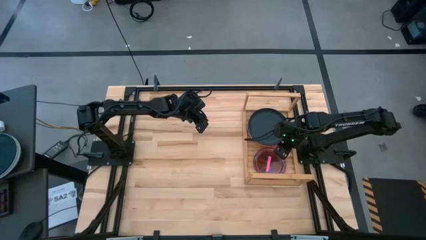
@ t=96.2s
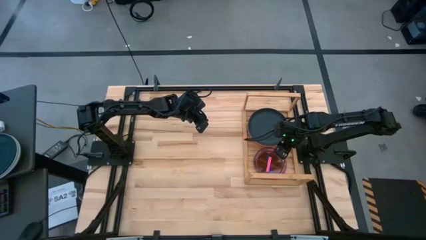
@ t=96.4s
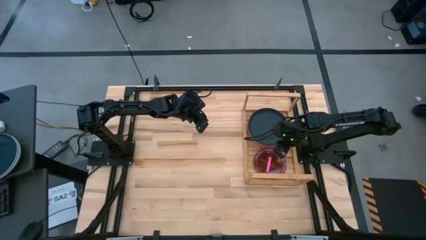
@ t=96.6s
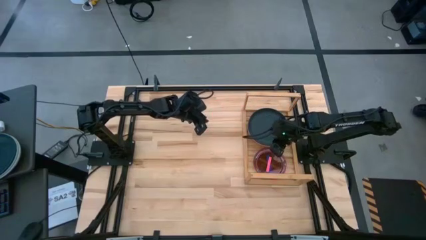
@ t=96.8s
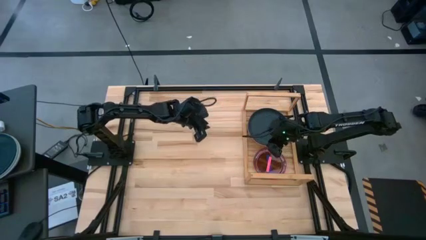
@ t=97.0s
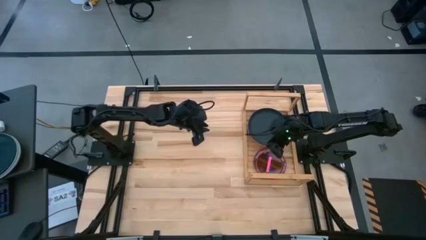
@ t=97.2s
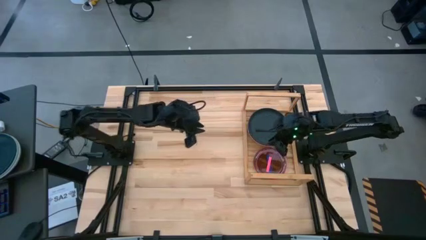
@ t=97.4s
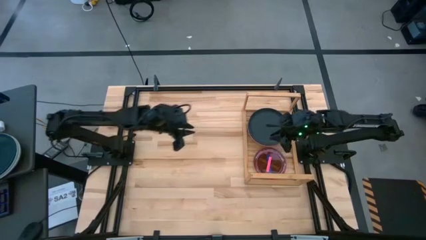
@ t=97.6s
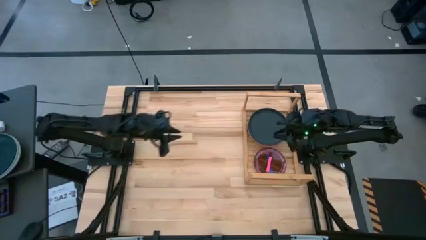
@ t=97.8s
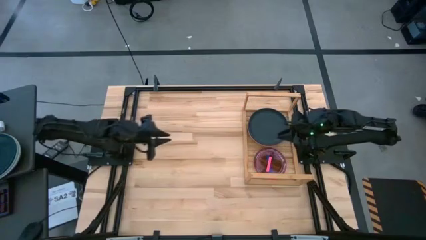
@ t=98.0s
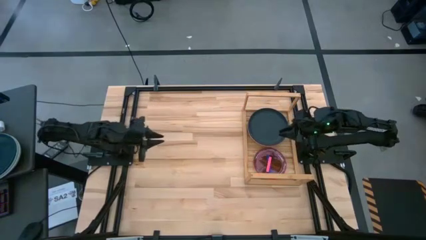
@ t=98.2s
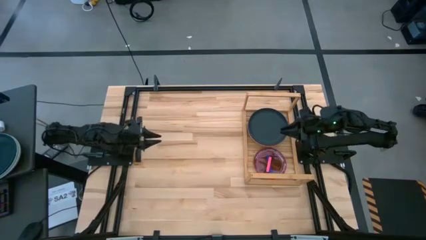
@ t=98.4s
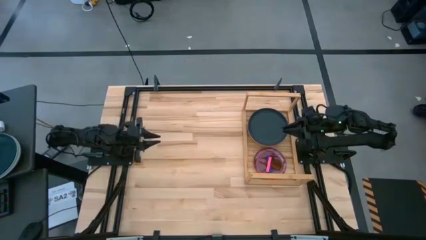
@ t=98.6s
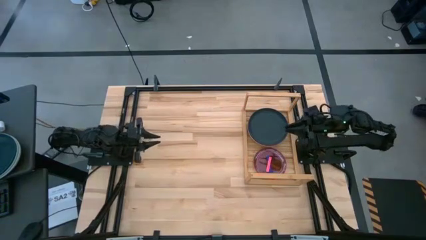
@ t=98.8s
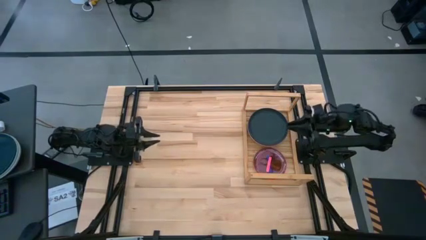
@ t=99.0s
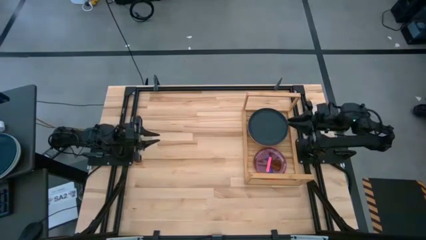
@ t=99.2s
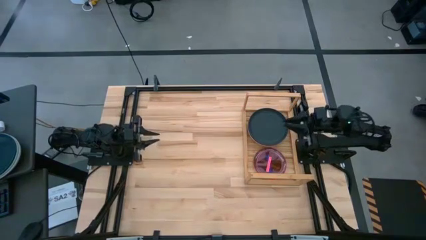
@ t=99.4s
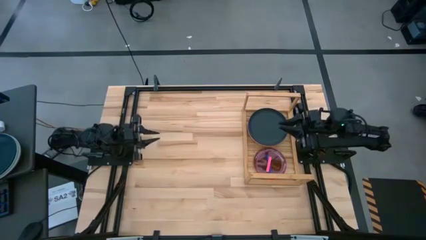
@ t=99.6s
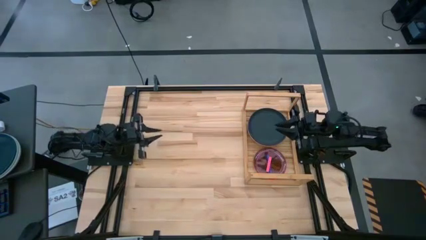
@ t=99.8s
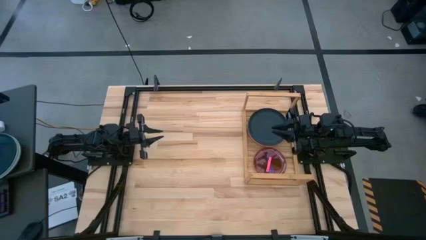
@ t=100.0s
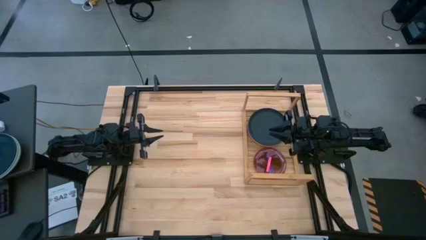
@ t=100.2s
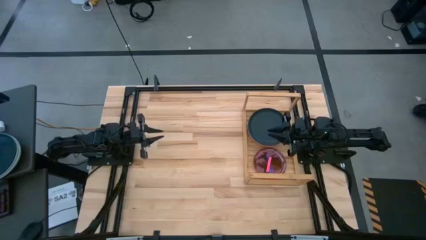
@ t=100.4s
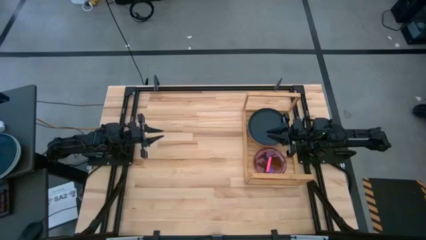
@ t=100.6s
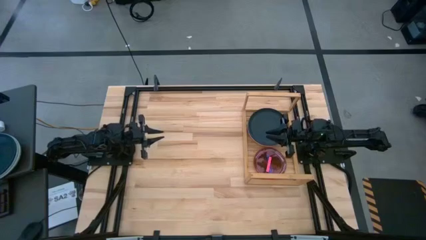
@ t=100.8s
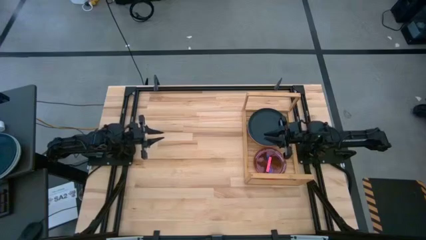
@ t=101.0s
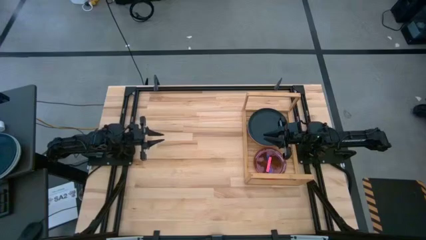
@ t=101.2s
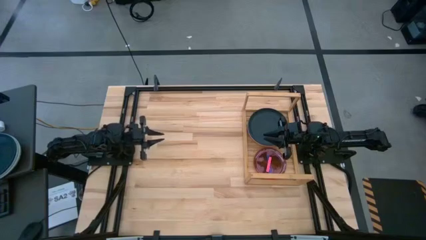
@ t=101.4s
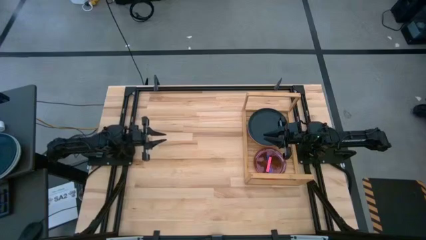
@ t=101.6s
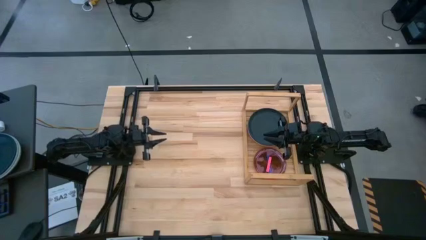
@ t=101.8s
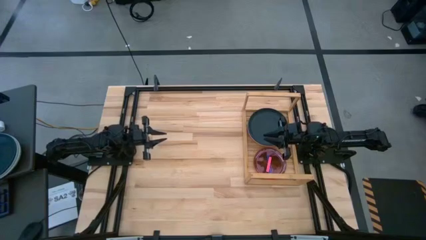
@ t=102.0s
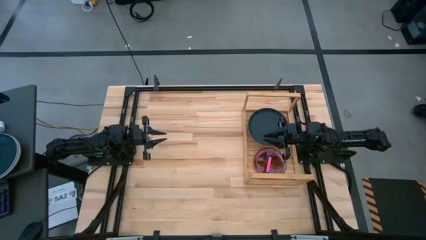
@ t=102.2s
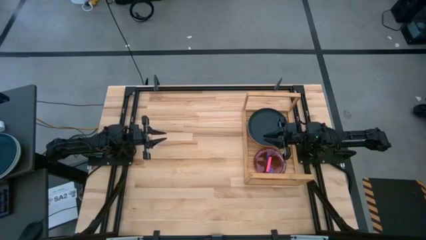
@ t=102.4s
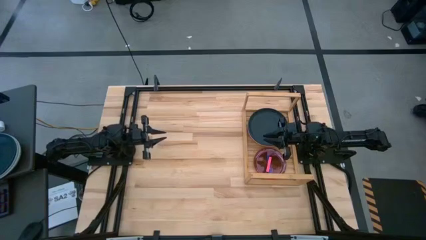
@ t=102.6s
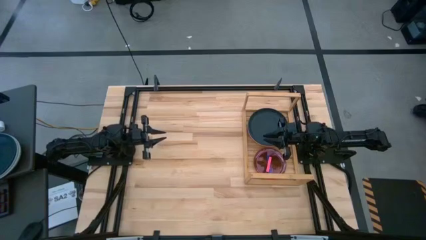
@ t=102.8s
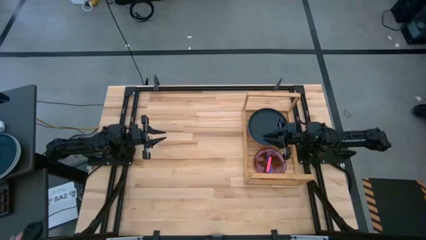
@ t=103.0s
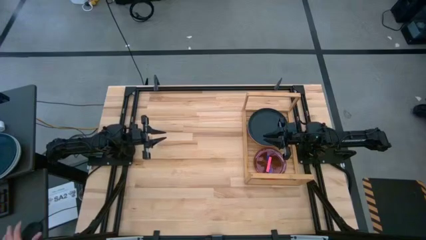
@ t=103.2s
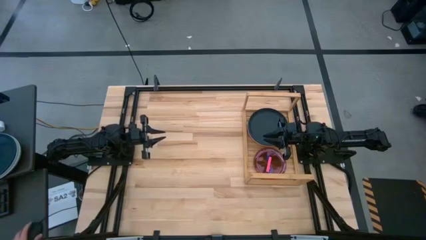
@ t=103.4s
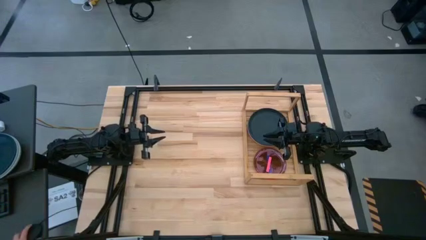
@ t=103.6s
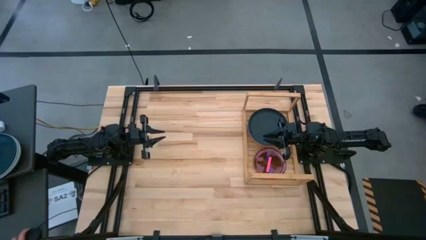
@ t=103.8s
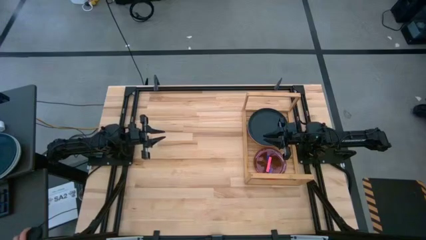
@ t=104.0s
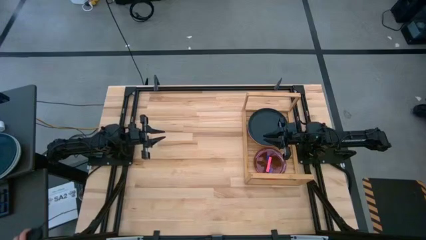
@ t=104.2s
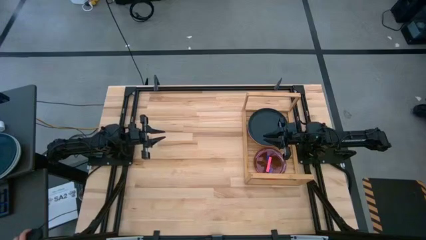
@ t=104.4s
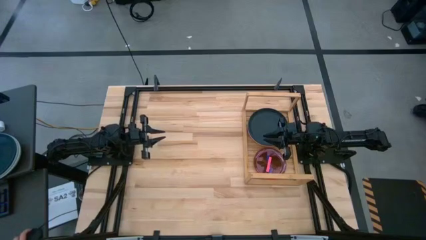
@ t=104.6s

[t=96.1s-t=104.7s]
Task: Place and stack plates onto a shelf
Return to Home Position

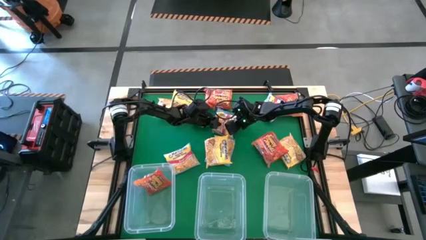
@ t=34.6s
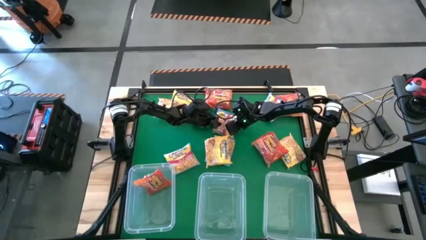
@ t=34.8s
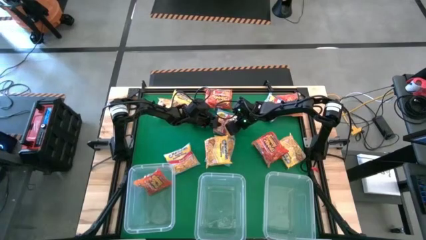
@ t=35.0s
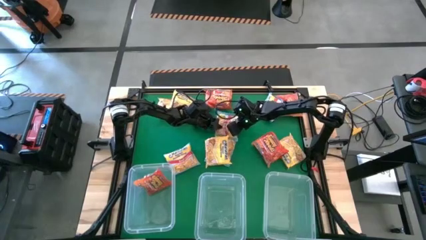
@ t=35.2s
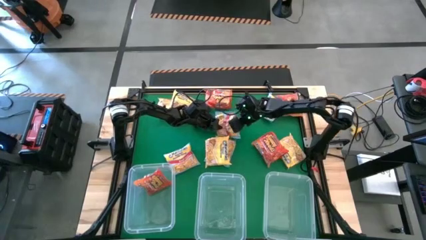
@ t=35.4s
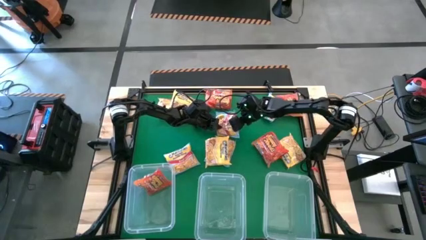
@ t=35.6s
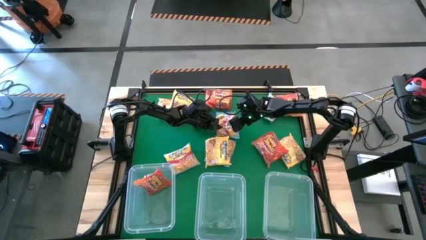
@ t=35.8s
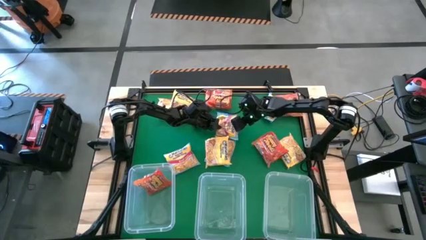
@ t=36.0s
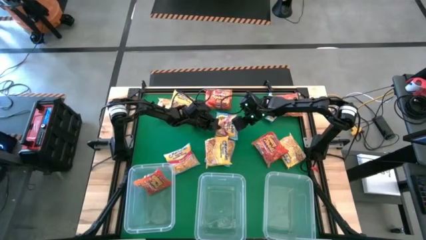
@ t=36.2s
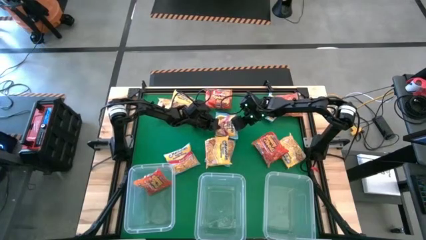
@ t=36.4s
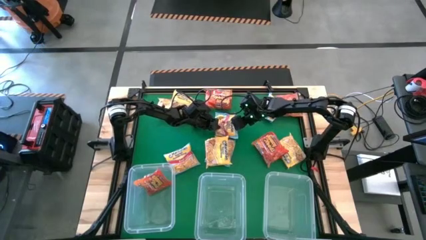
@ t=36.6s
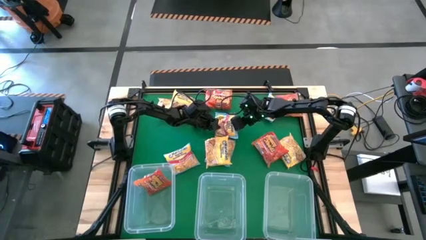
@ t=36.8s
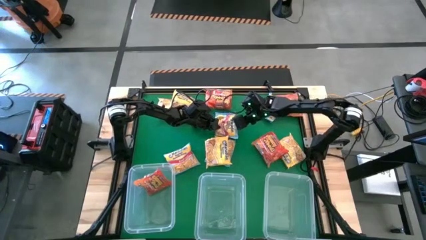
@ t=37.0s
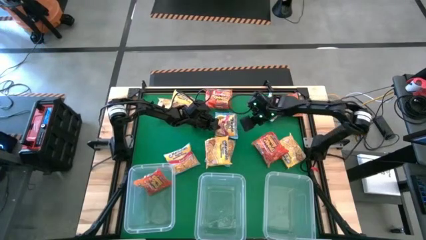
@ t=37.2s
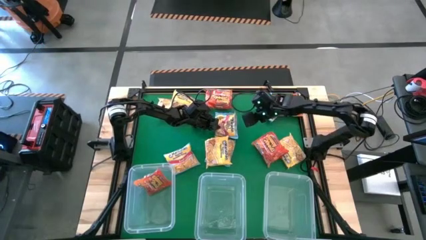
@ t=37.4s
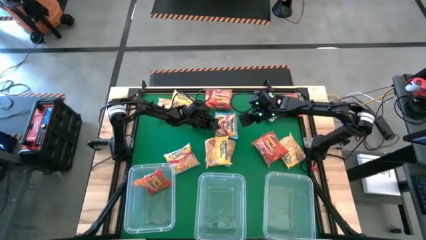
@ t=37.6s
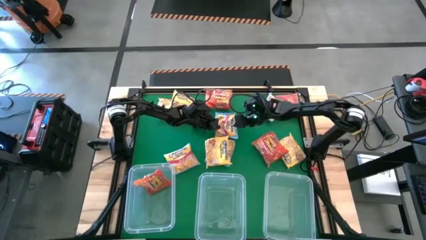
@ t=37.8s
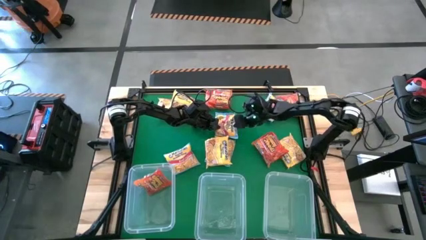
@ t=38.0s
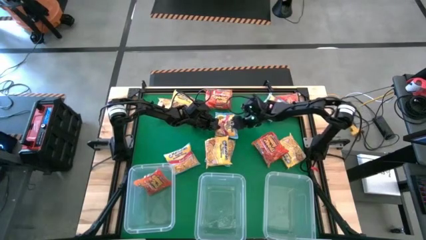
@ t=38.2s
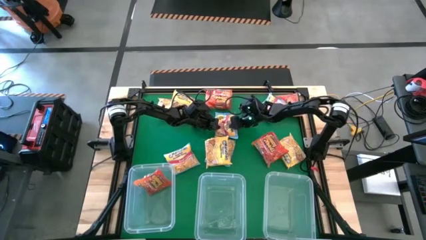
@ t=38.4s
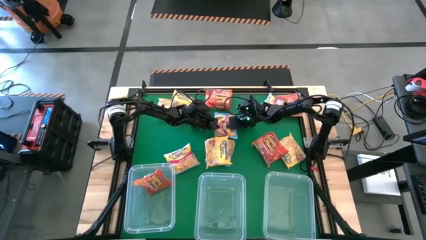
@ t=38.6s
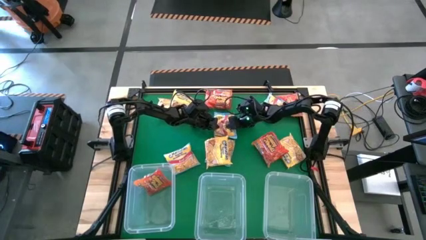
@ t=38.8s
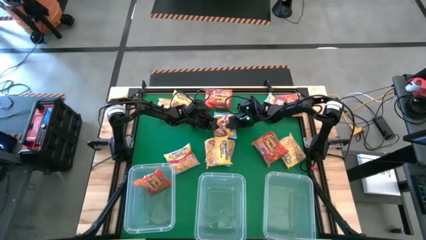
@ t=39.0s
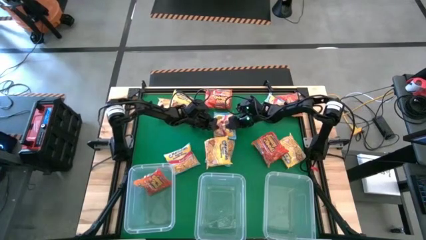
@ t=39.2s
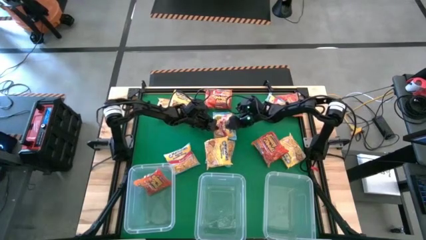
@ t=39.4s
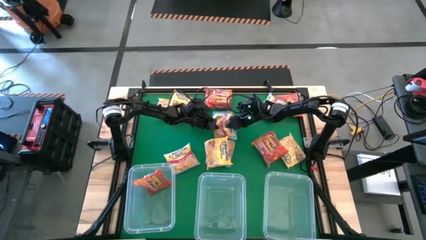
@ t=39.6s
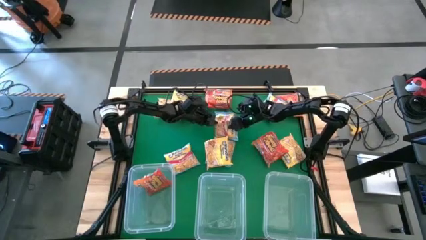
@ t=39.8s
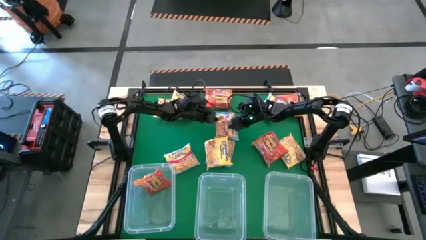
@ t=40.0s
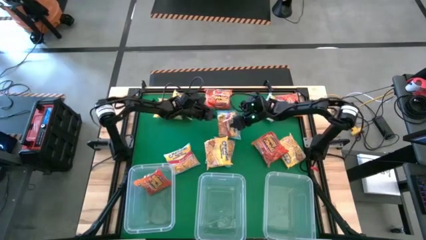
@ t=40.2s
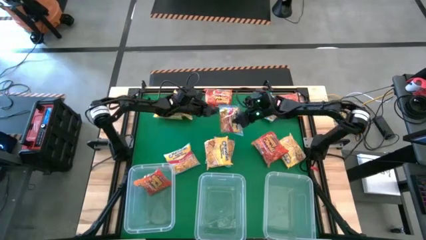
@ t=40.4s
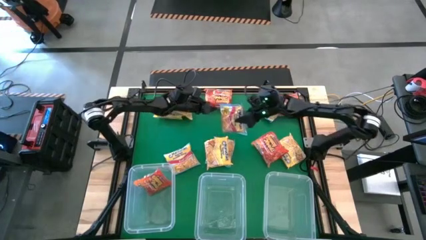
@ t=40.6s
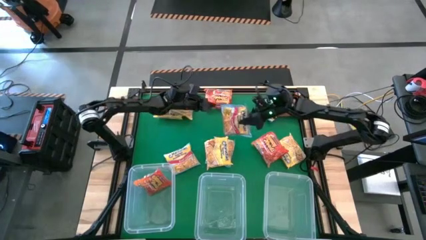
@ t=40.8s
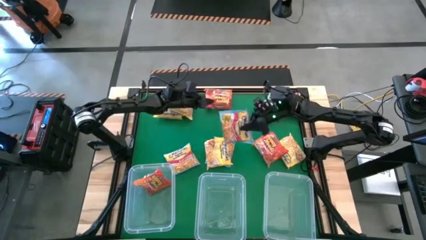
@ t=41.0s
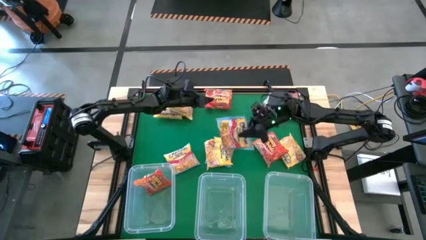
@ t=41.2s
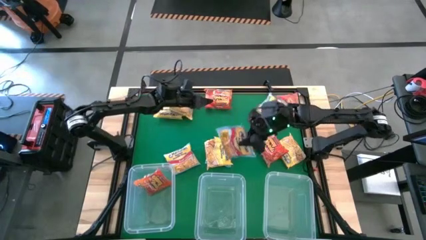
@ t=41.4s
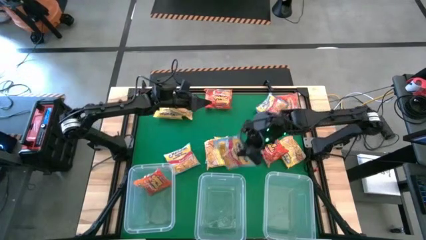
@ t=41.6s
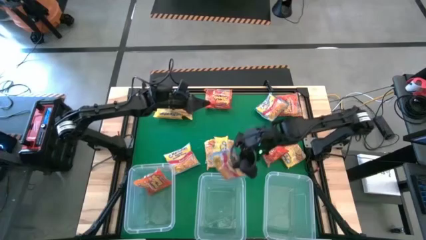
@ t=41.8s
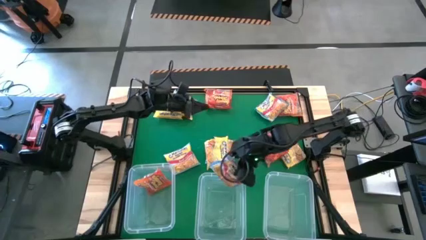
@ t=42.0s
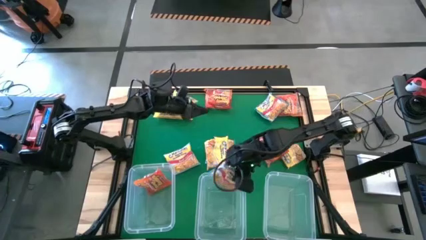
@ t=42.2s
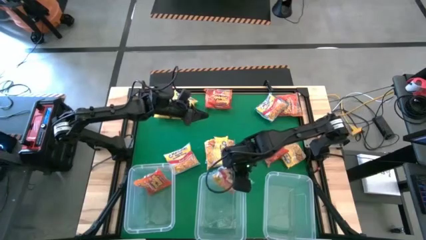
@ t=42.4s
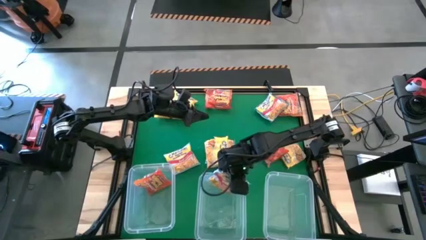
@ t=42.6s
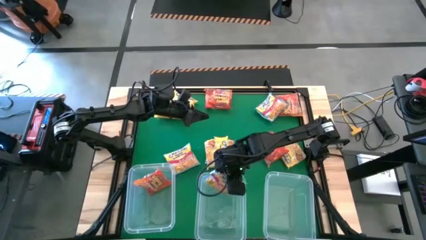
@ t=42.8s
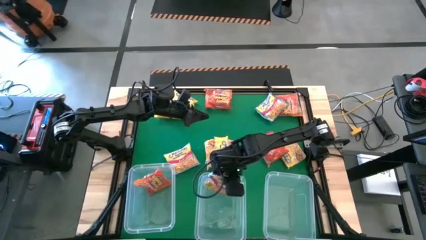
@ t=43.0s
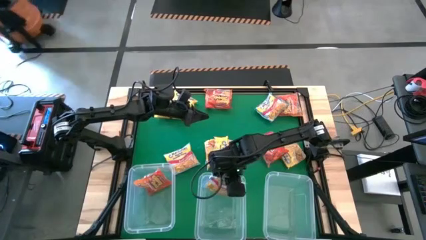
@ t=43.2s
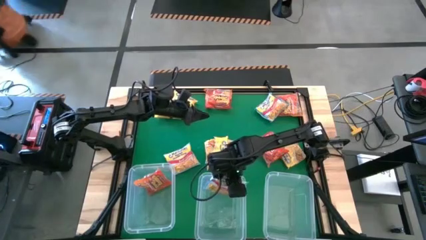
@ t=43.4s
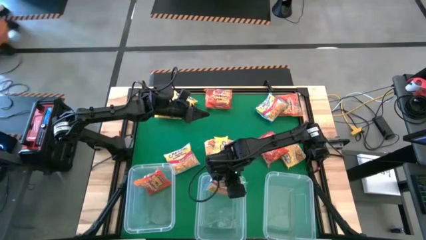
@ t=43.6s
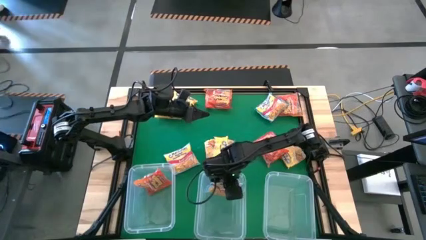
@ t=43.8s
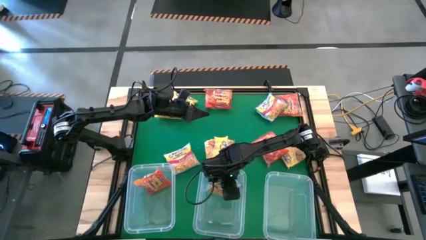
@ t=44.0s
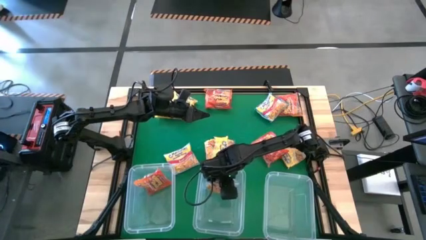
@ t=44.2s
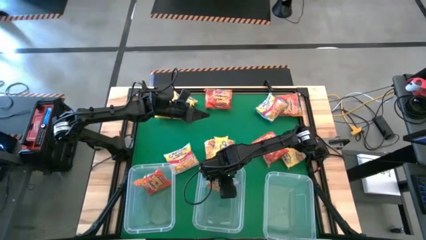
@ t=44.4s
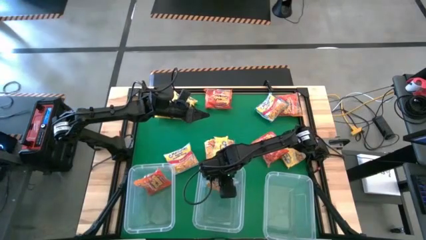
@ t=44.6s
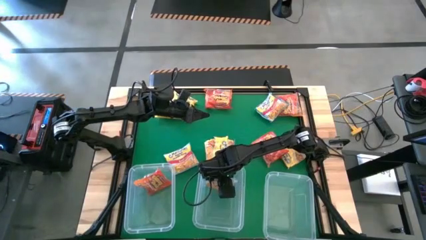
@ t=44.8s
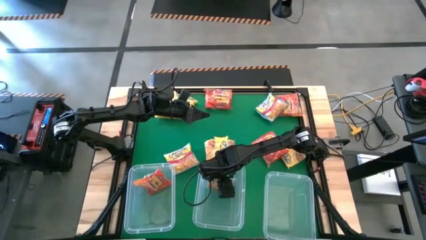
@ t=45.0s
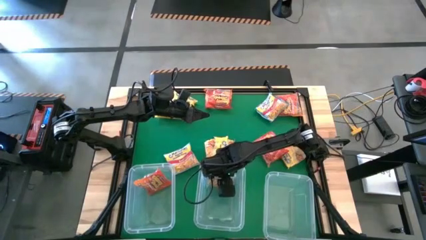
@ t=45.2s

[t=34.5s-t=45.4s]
Task: Sort Maruchan noodles
Put the blue noodle pack into the middle transparent bin
